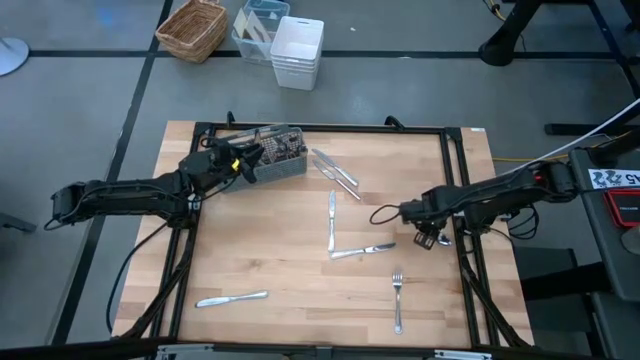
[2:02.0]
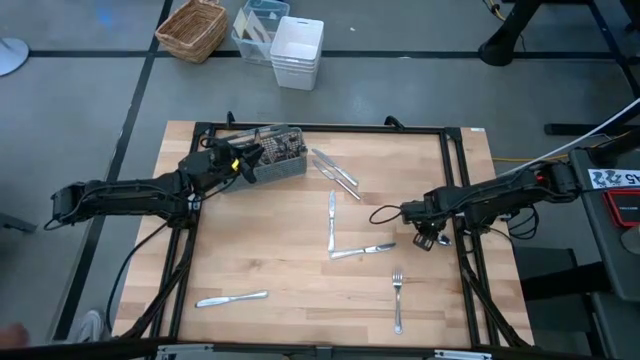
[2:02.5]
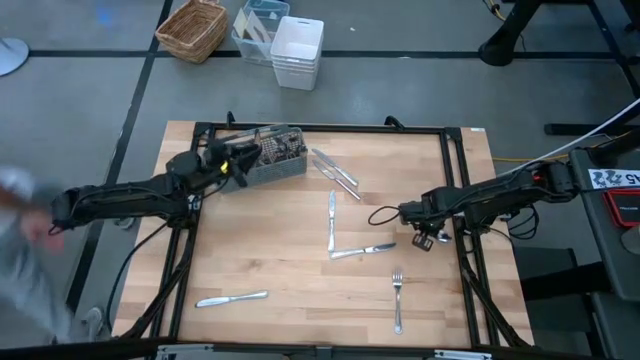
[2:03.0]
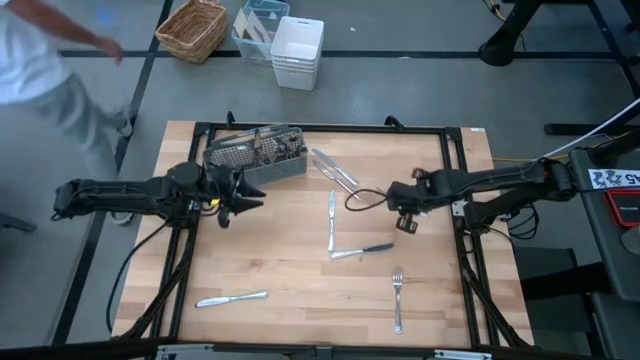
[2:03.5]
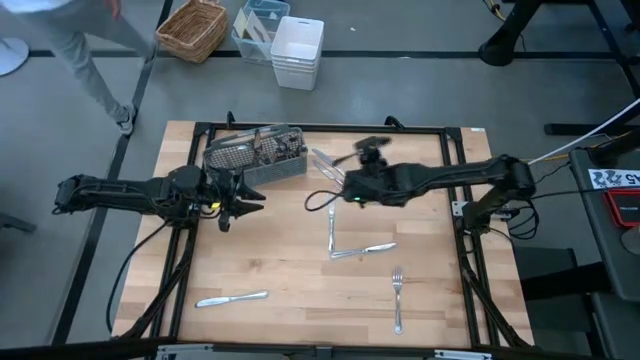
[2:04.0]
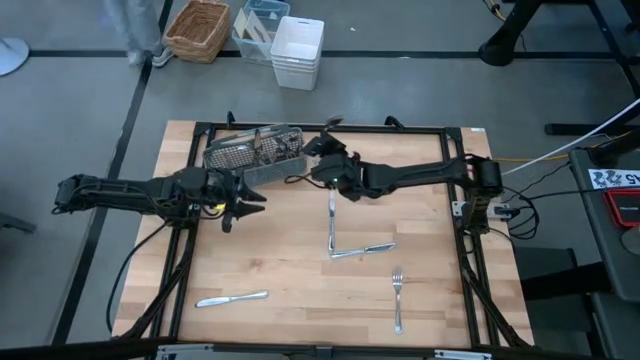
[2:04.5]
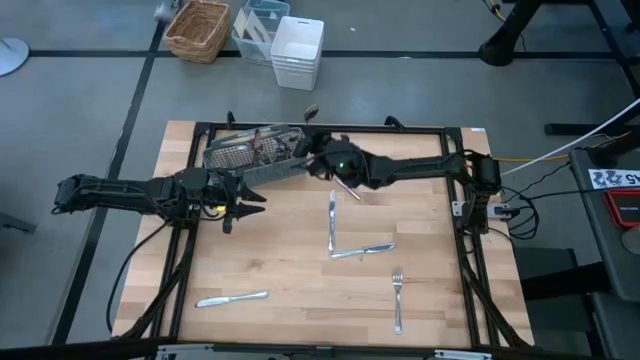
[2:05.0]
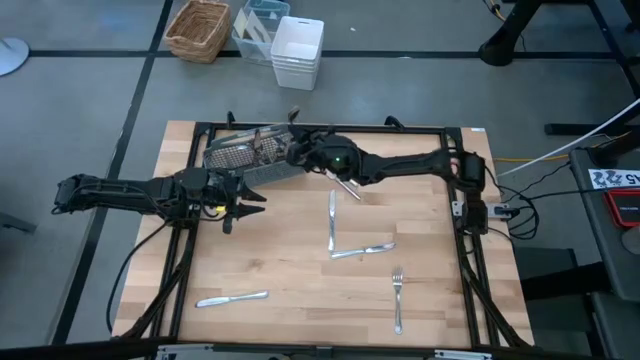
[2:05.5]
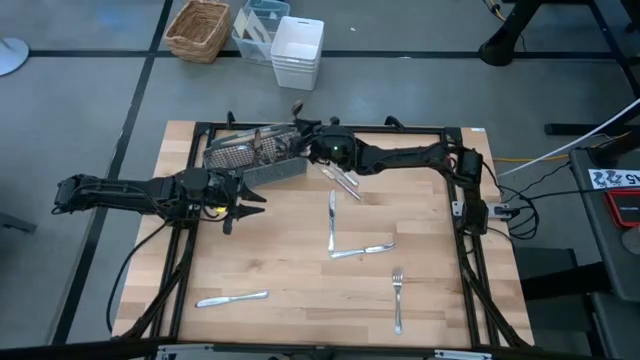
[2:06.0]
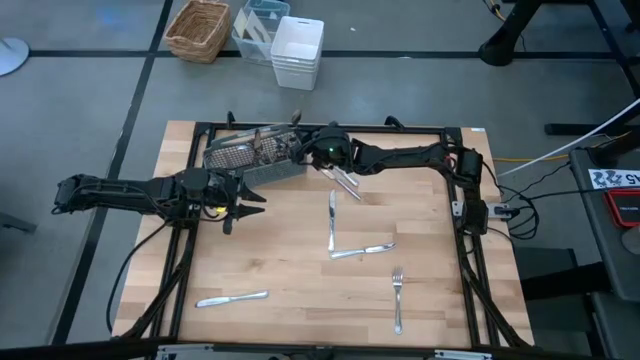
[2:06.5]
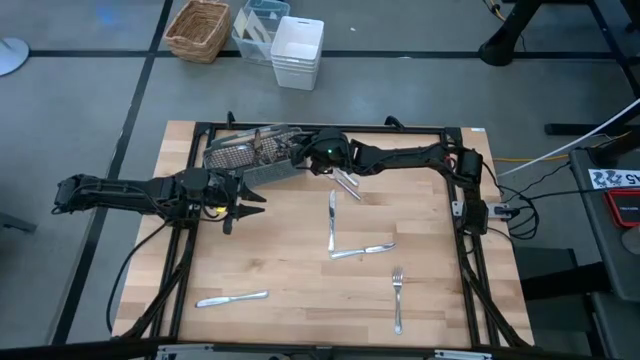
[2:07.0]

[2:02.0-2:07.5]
Task: Sort silverware
Put the silver fork into the silverware rack

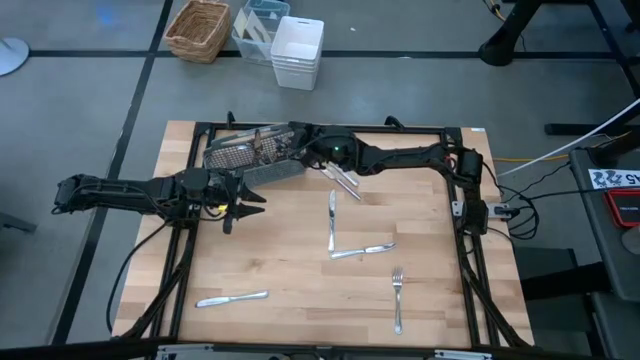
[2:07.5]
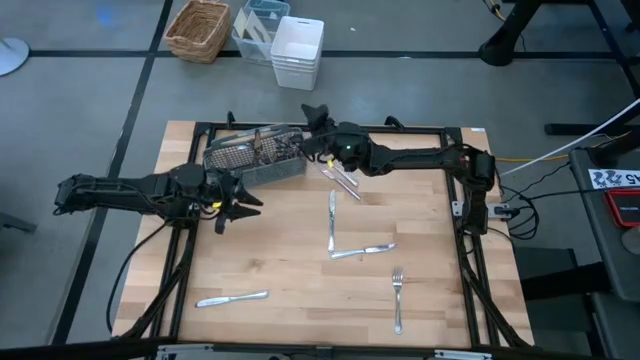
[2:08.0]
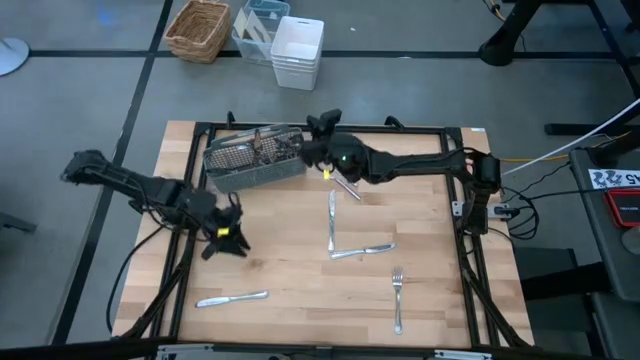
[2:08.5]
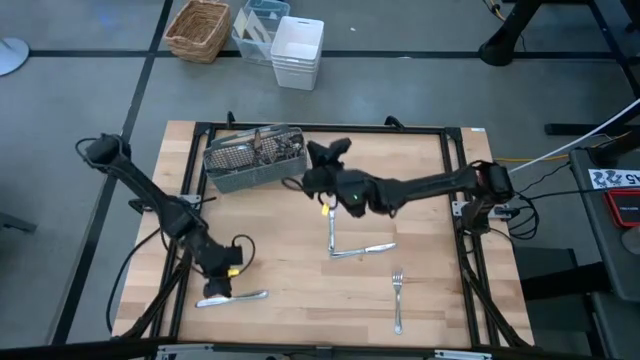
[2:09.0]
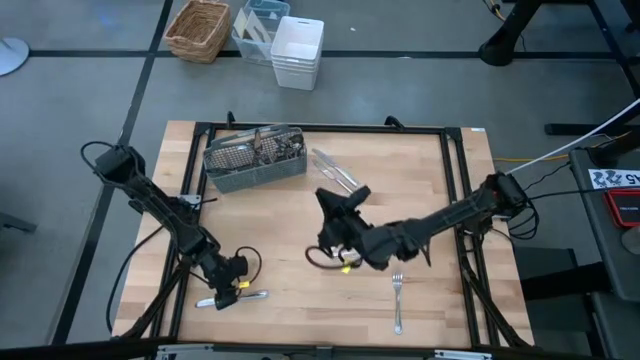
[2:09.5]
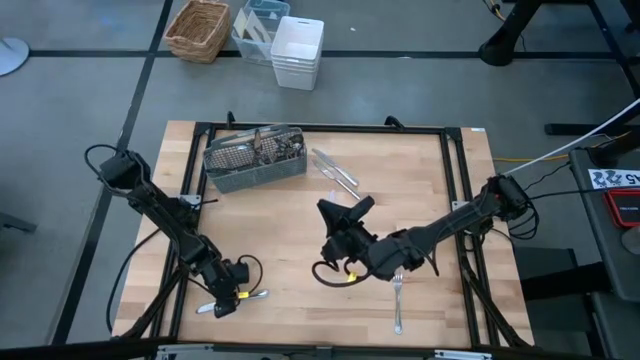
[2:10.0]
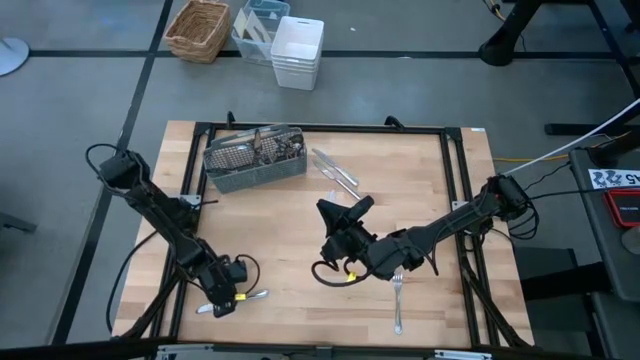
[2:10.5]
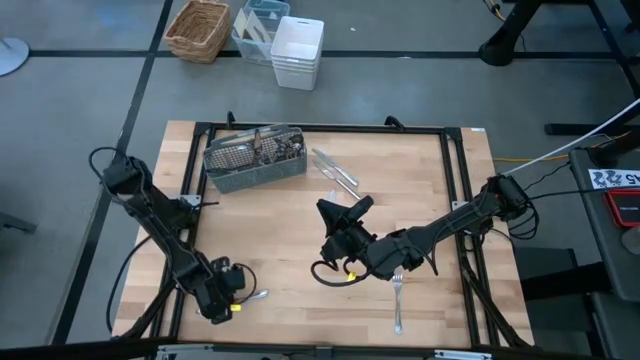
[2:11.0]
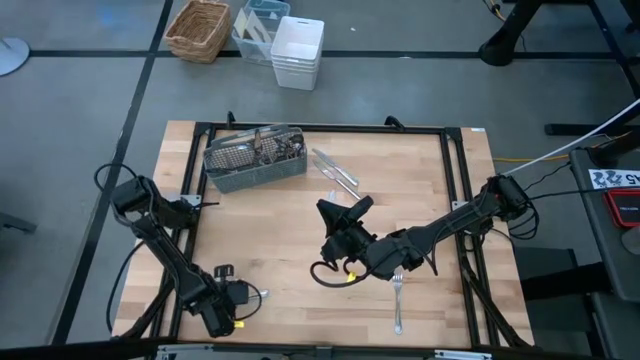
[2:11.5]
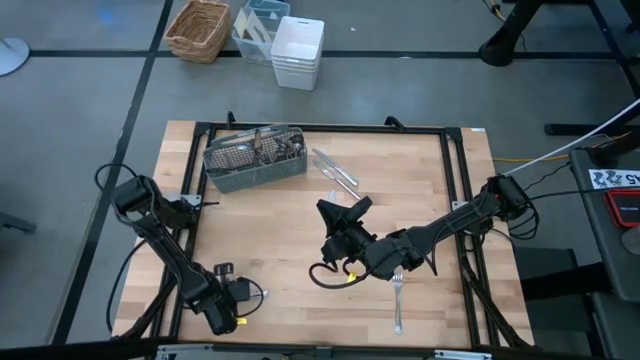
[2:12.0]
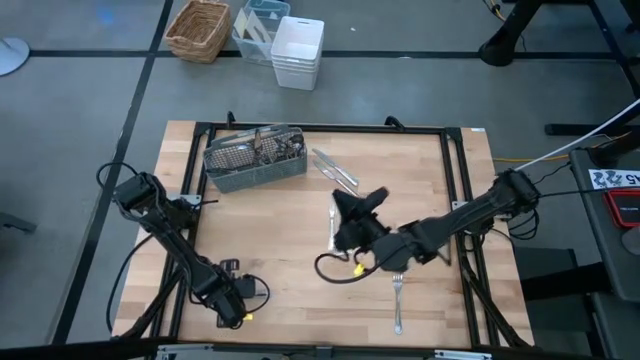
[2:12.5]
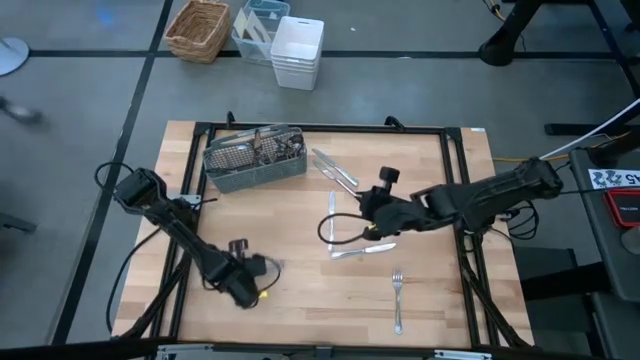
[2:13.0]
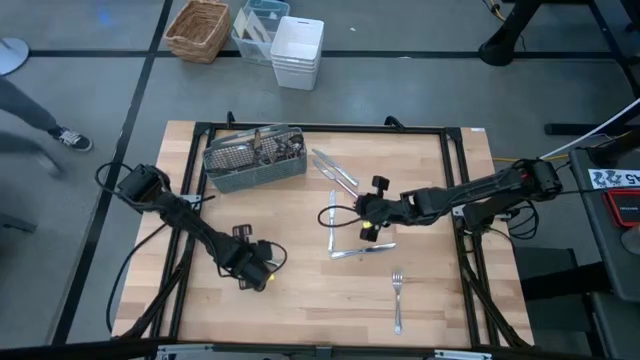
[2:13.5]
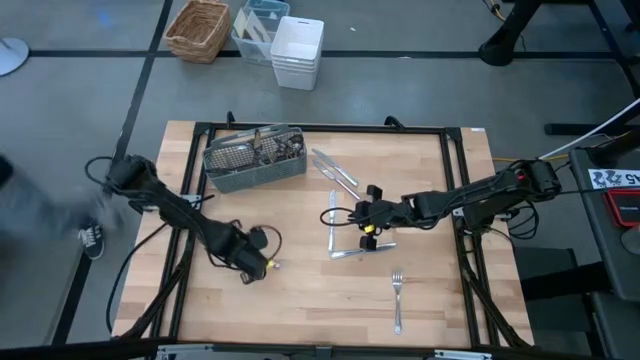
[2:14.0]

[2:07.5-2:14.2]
Put the silver table knife into the silverware rack

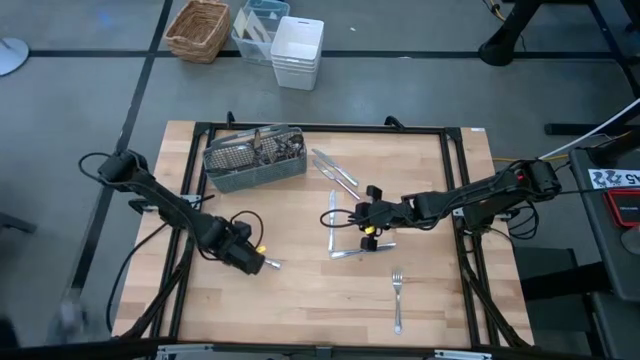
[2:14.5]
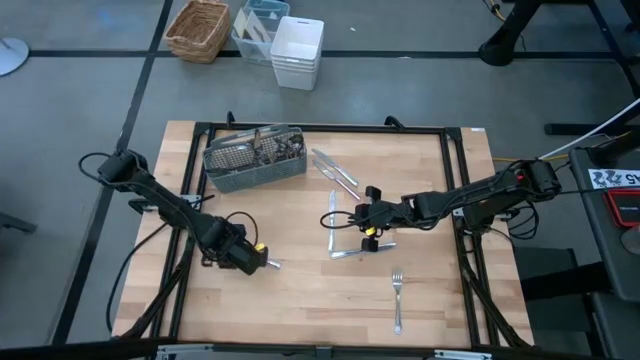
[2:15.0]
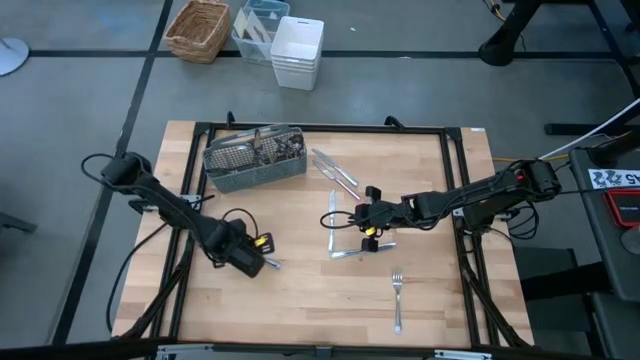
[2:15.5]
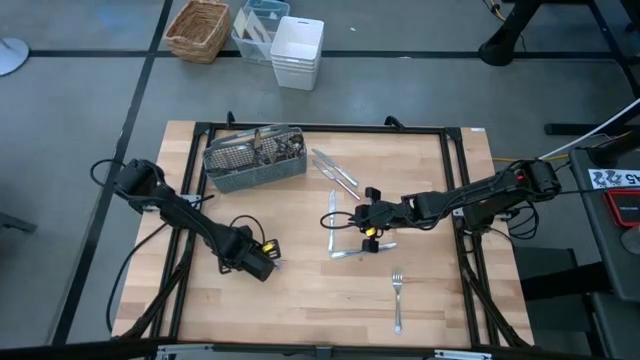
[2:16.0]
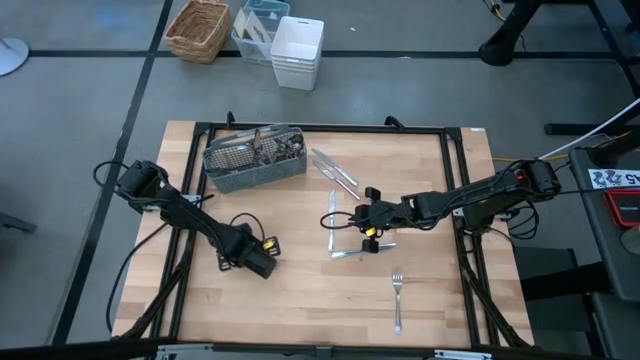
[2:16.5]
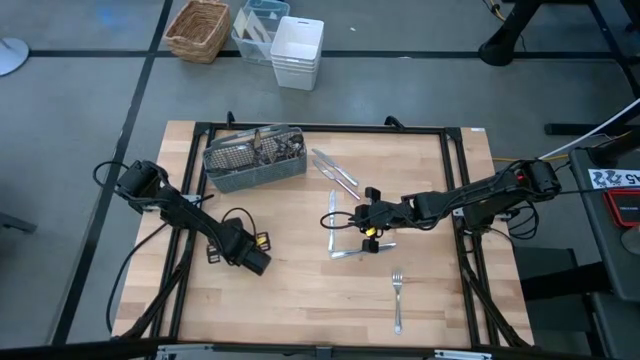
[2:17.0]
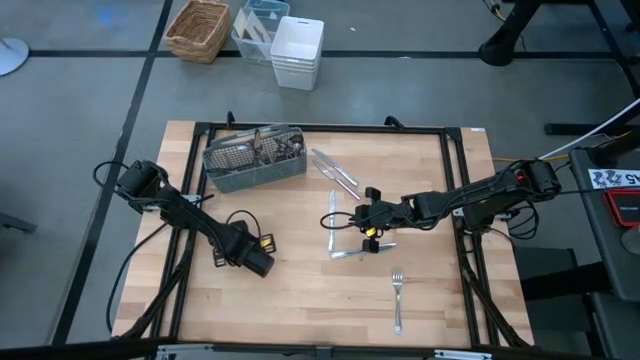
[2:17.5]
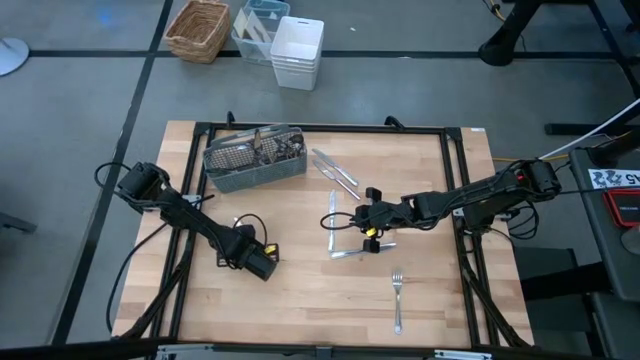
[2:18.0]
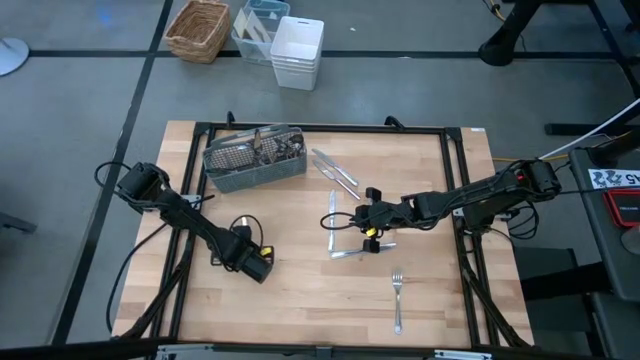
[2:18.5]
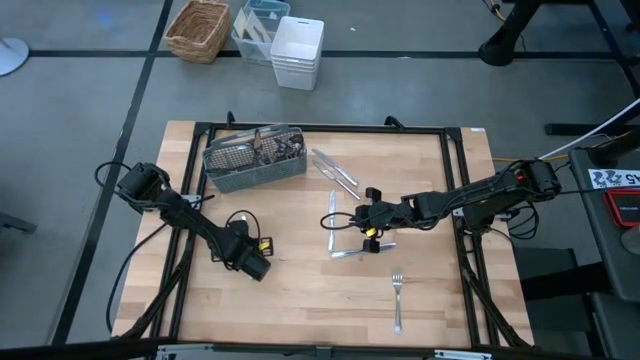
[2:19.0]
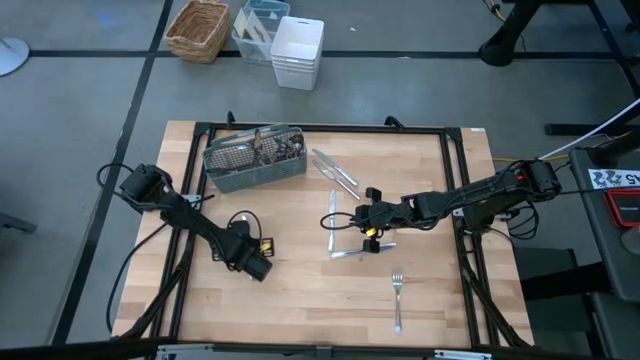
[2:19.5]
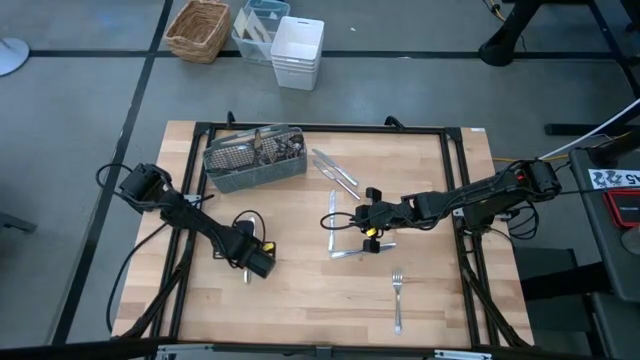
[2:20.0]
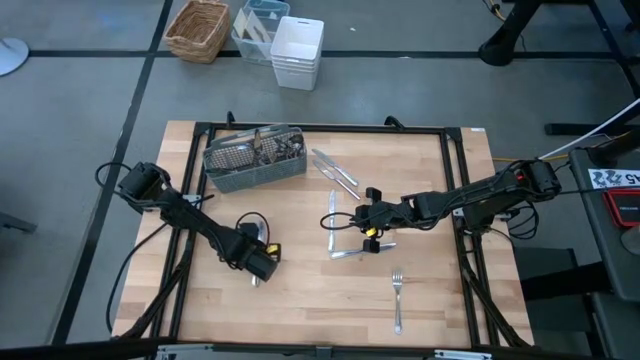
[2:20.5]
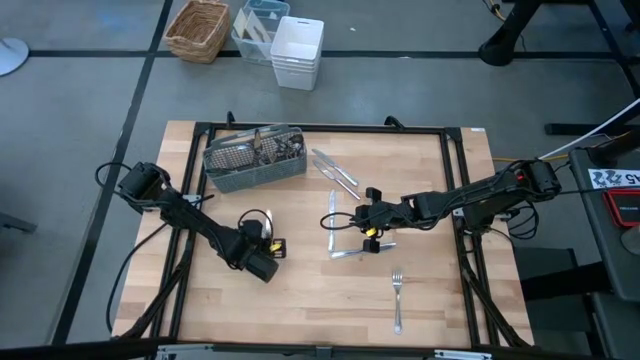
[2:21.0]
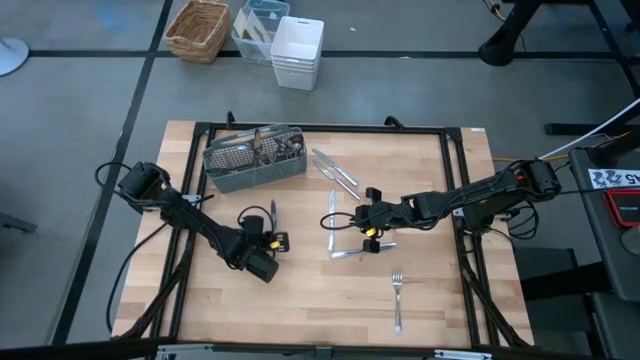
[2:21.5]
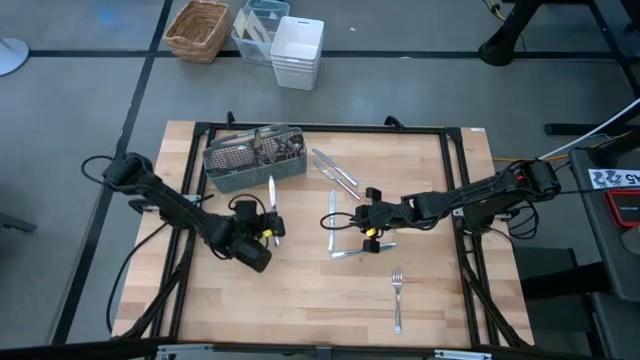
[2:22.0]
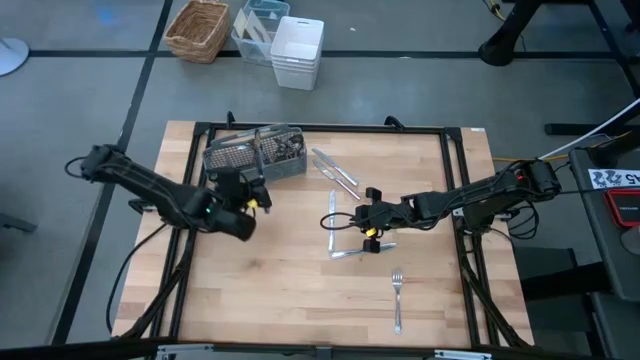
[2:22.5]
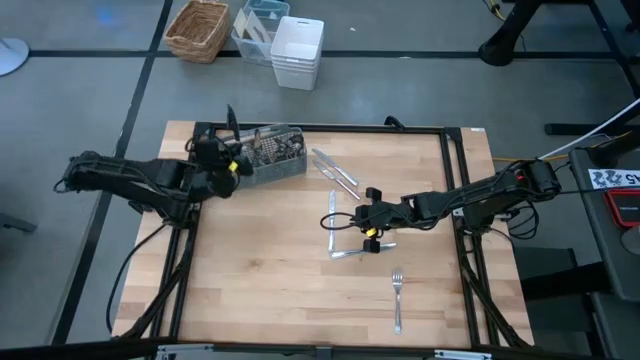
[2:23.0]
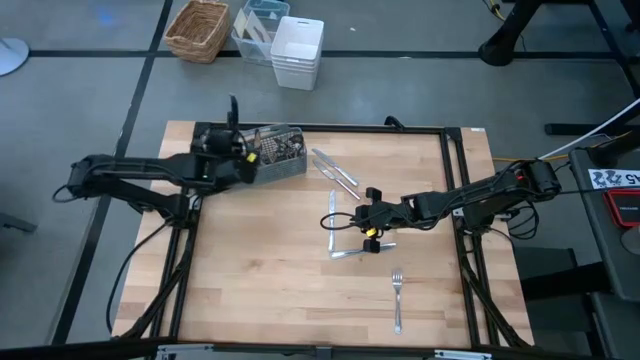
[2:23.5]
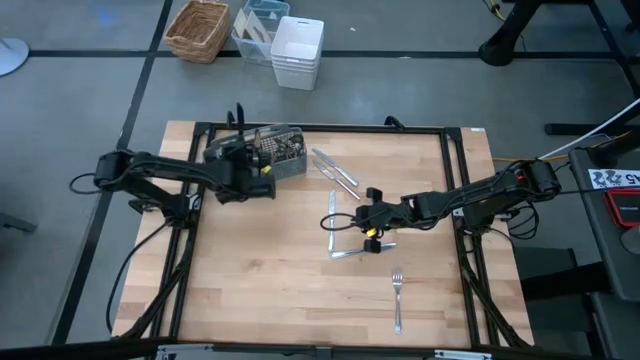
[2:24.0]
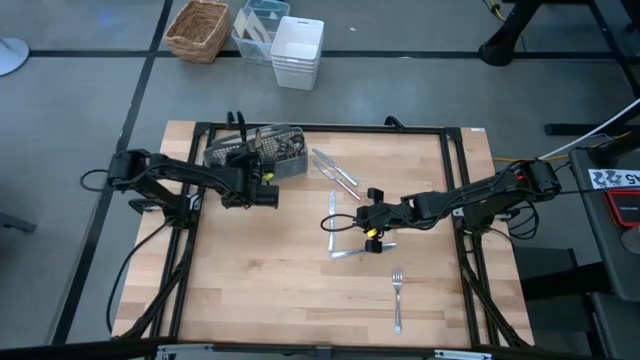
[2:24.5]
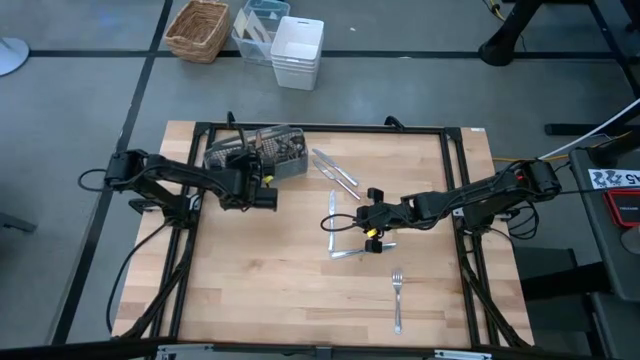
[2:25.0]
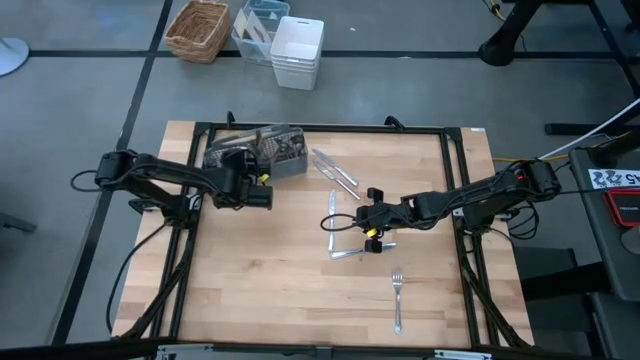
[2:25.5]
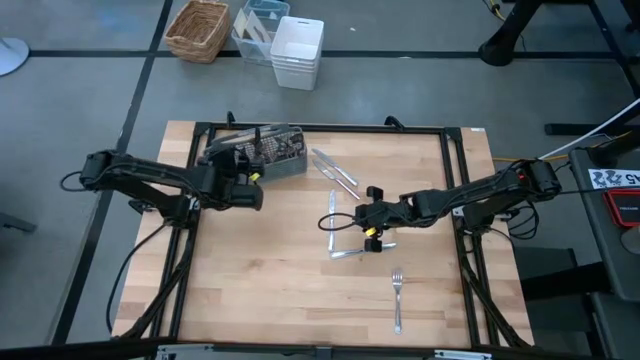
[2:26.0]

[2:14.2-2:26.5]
Put the silver table knife into the silverware rack
